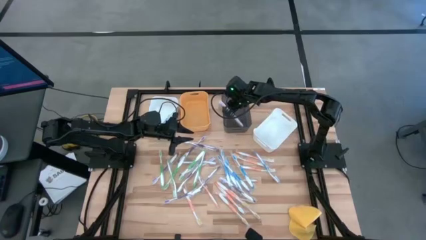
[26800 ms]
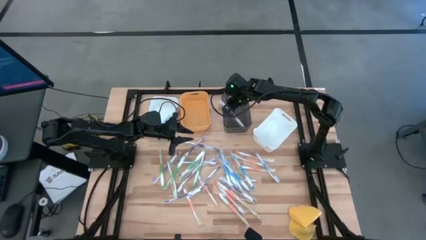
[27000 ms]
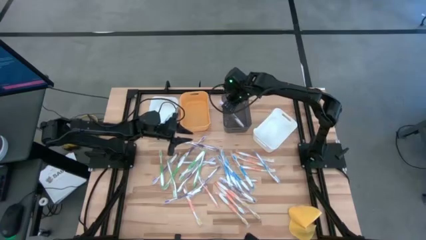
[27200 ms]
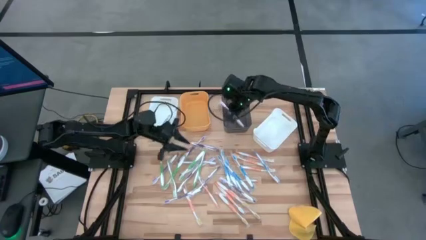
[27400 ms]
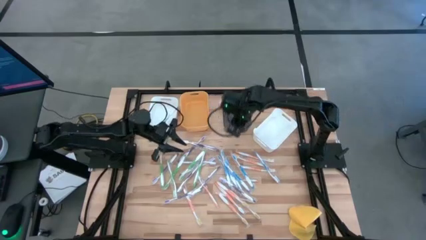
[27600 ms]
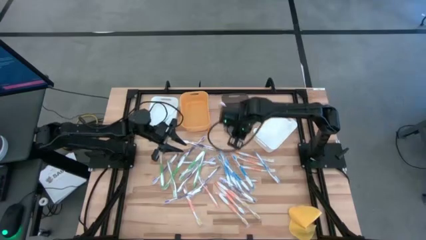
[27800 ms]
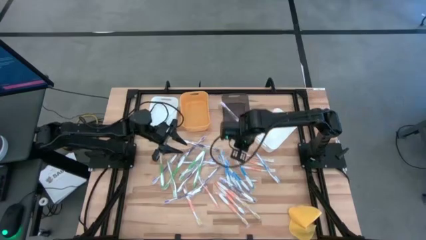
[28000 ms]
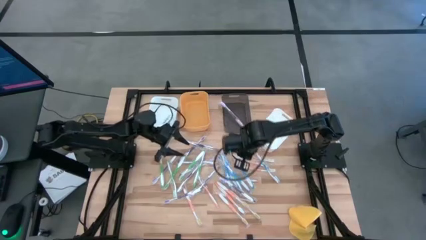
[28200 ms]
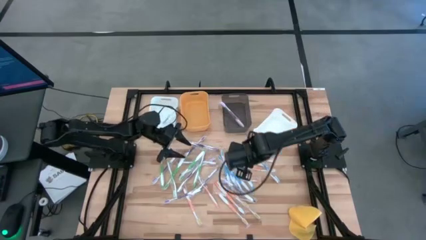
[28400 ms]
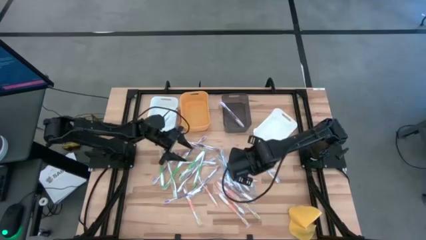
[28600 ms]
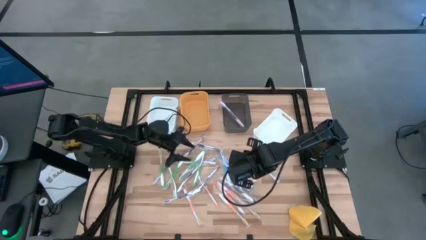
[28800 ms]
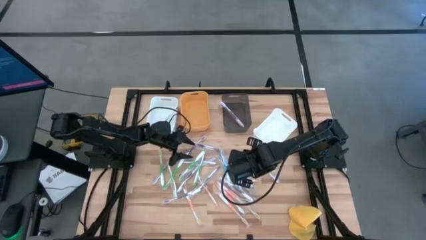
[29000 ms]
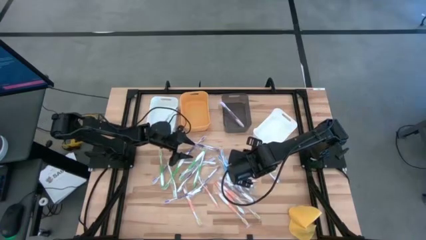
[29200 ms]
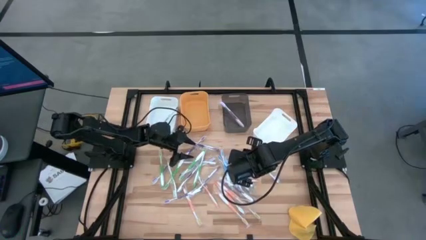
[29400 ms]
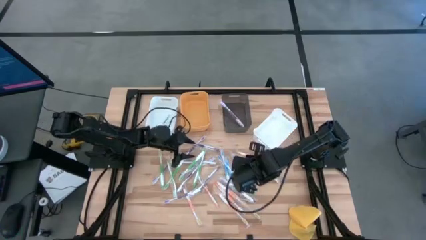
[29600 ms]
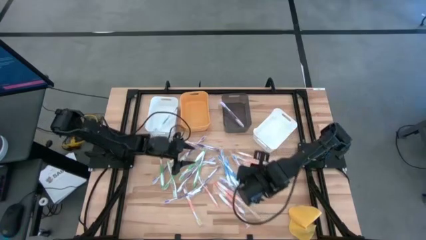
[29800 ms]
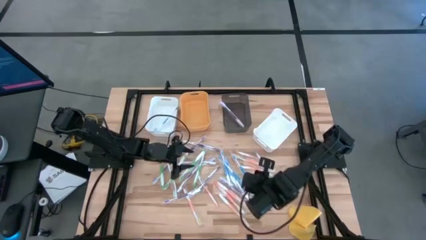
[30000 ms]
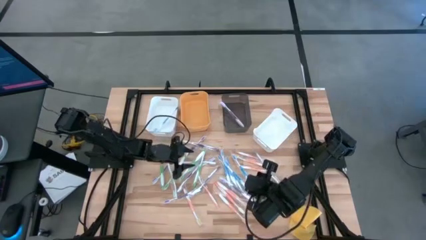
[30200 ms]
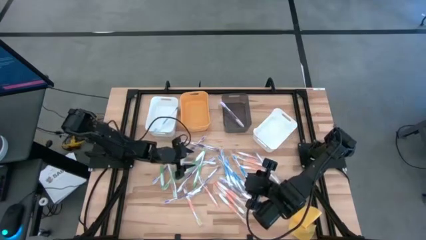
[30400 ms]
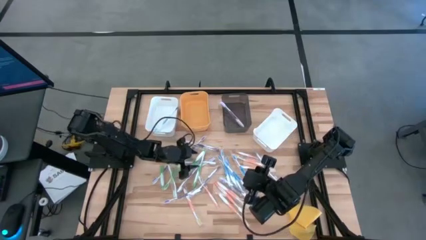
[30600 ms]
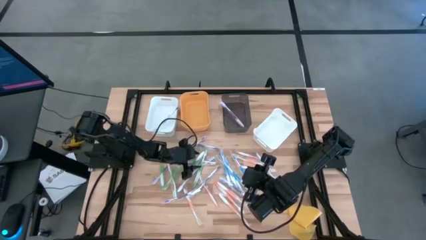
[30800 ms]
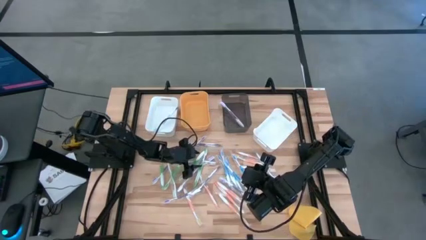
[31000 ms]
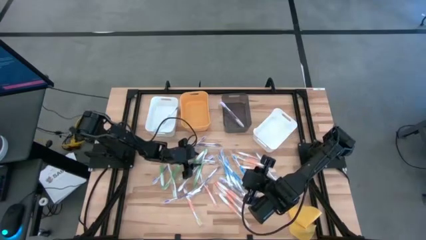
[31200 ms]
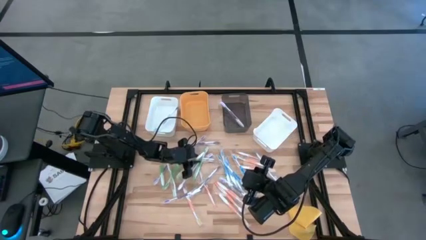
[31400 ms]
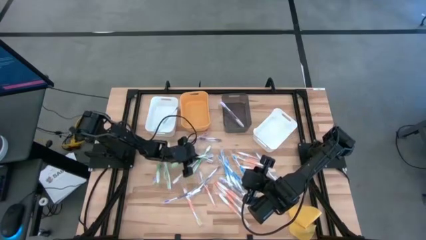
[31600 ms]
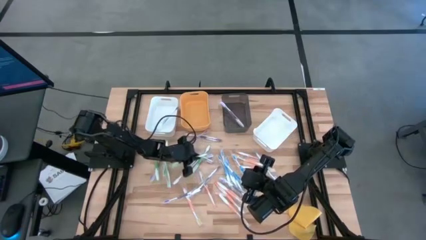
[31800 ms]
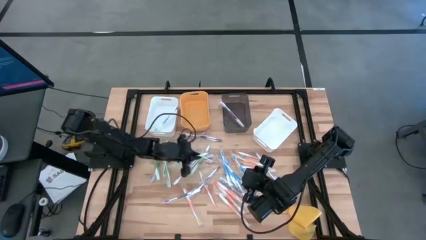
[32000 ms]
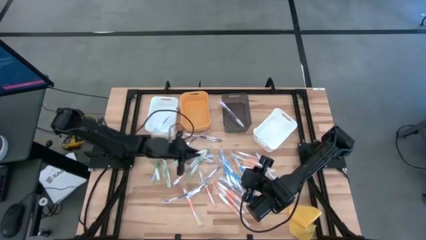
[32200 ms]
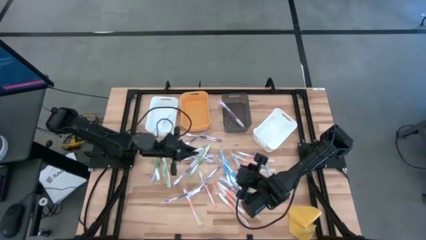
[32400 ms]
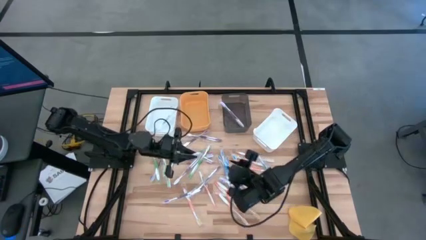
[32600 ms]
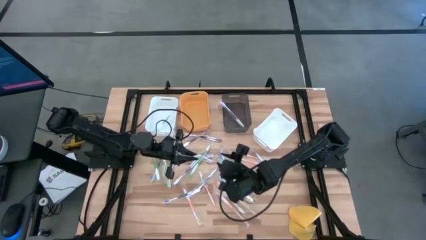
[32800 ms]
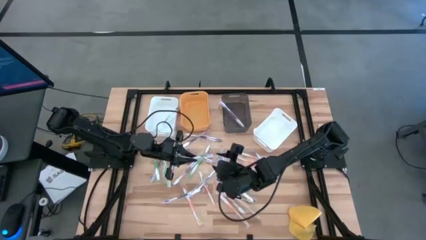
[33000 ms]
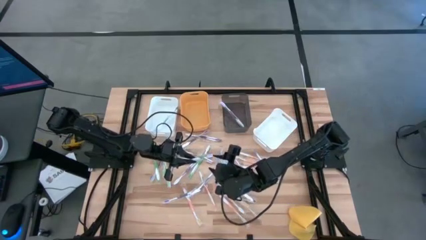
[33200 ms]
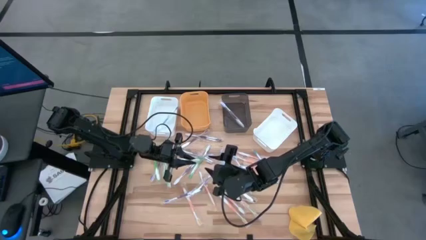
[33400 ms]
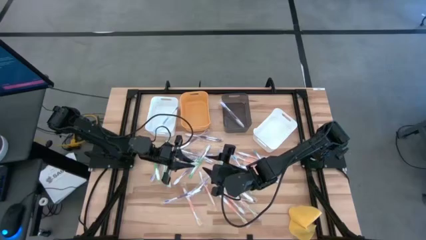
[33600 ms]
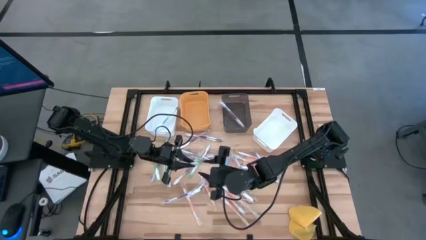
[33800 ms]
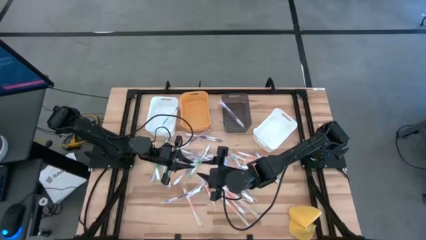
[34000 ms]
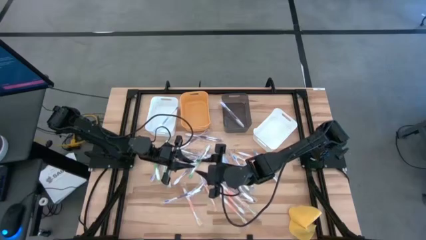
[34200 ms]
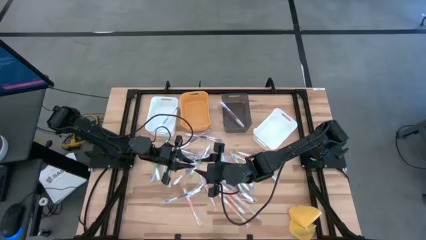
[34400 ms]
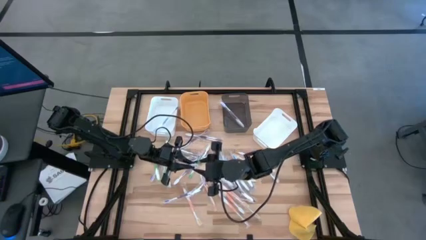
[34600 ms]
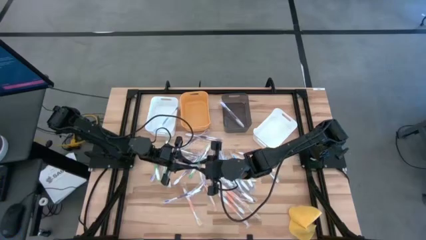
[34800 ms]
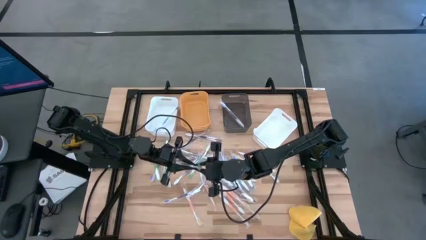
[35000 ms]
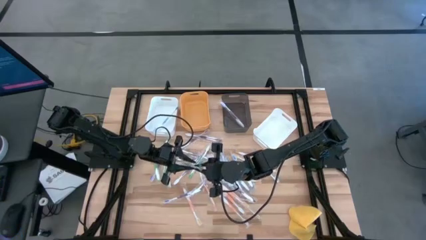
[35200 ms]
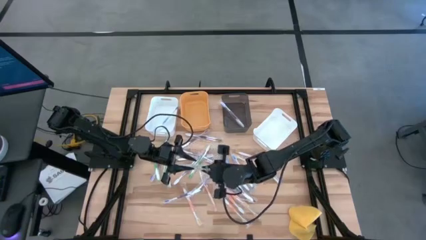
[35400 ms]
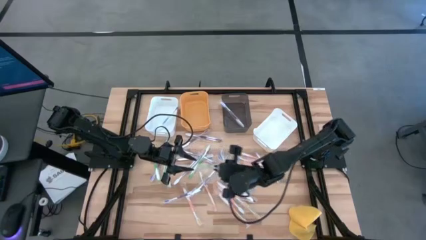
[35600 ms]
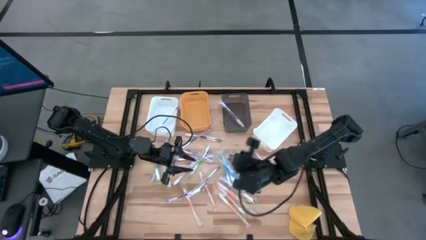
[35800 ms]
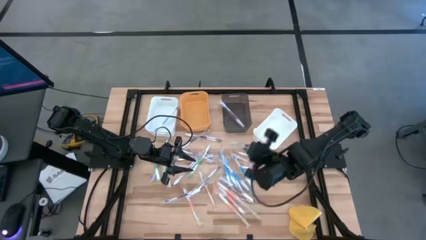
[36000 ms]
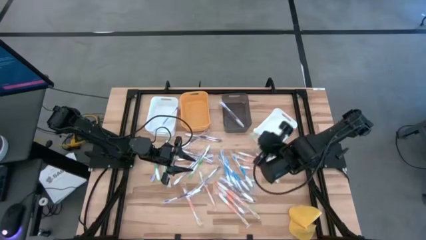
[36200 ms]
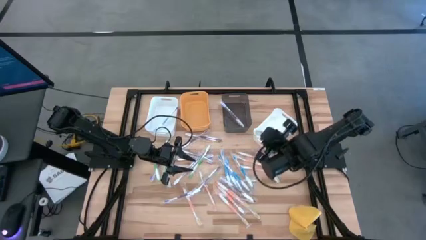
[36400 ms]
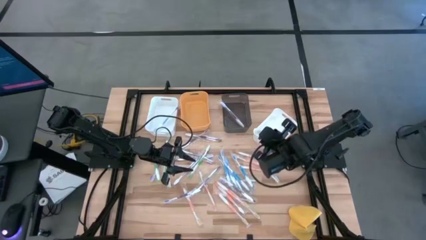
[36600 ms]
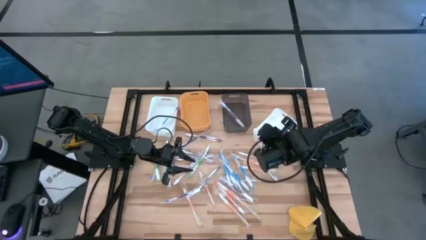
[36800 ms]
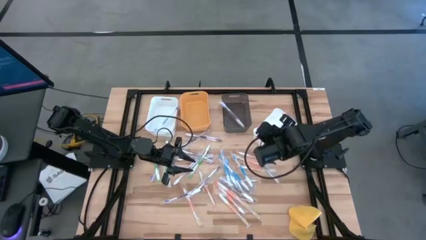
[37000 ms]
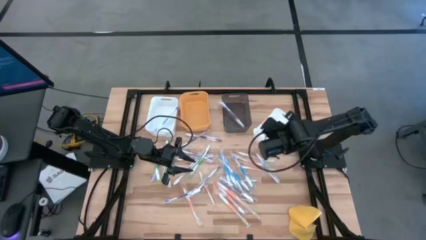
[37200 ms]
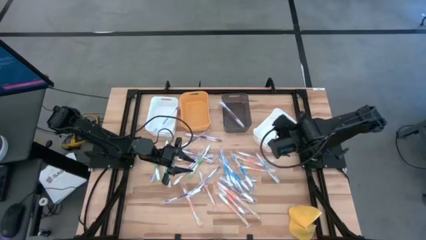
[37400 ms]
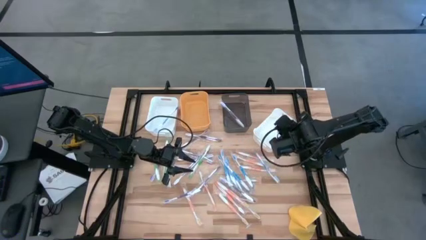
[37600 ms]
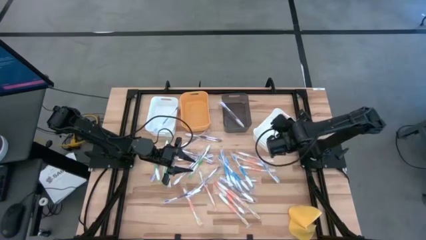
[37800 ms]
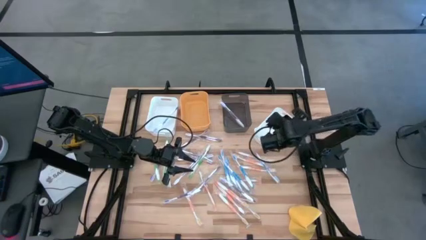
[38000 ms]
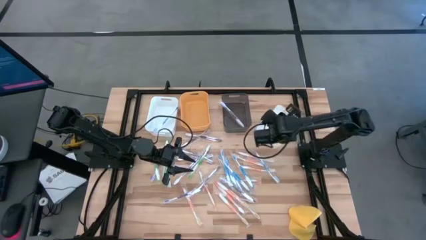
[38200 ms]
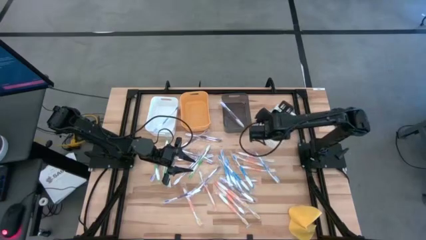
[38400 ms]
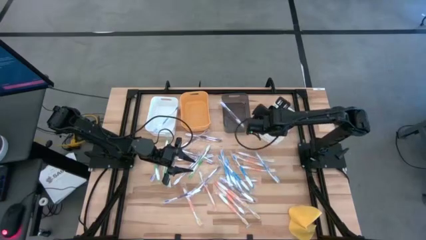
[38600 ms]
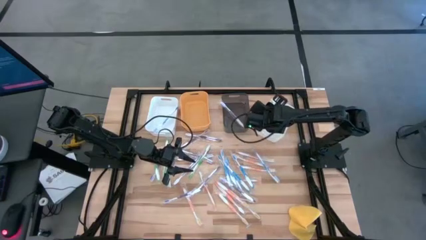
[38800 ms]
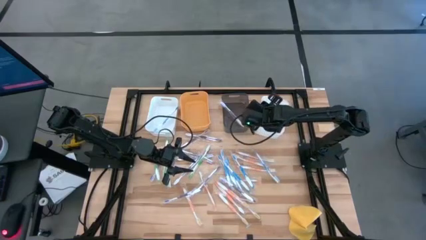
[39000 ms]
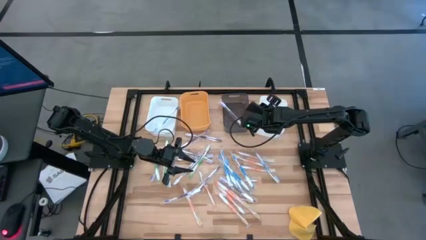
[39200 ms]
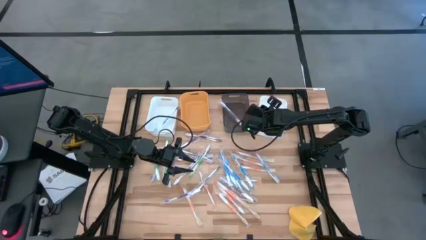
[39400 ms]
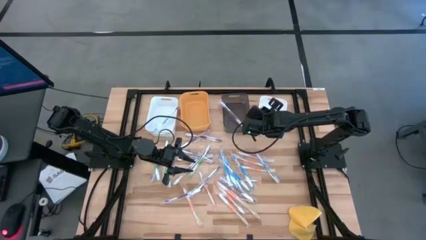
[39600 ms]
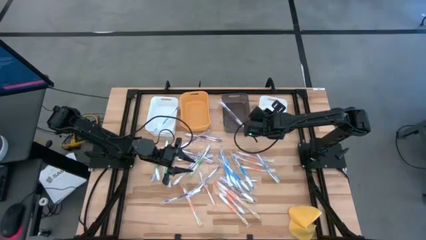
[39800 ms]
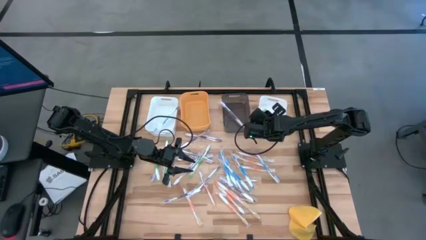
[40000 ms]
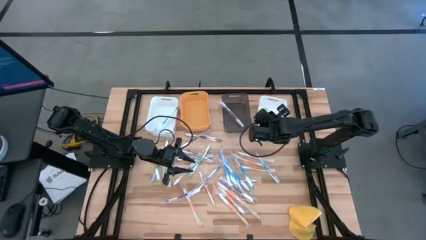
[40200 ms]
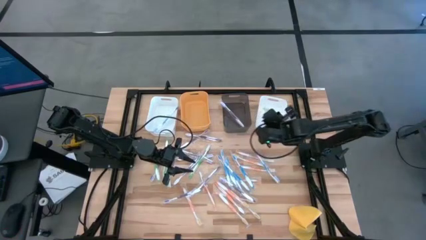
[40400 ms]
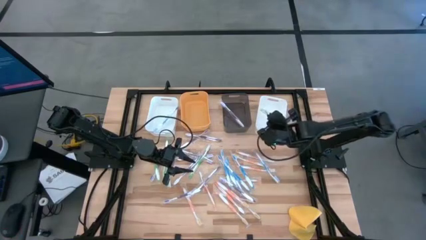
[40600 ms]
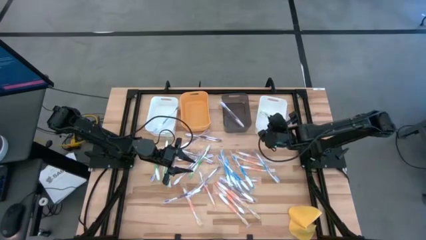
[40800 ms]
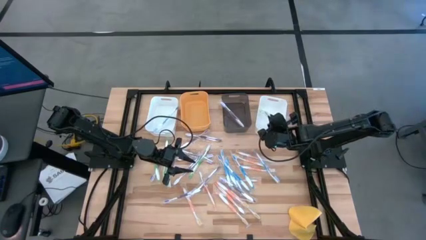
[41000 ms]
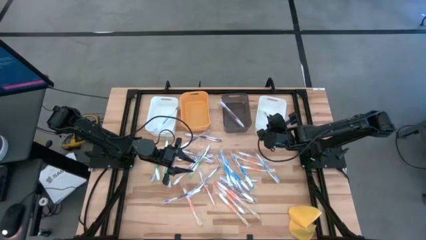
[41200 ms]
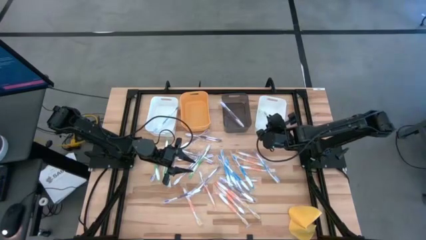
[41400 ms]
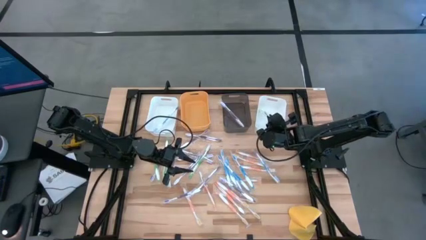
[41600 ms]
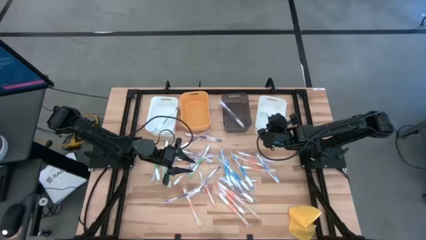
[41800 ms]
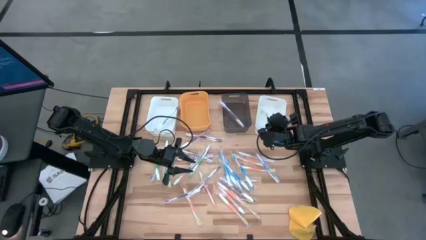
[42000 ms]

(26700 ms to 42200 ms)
Task: Pick & Place Toothbrushes
Put the green toothbrush into right white the bin
